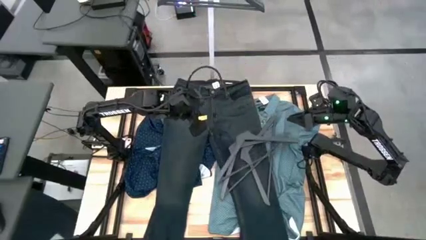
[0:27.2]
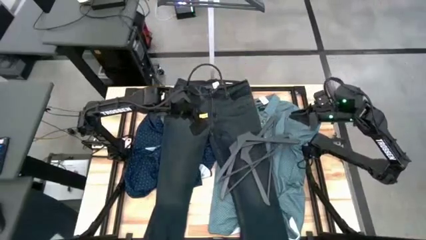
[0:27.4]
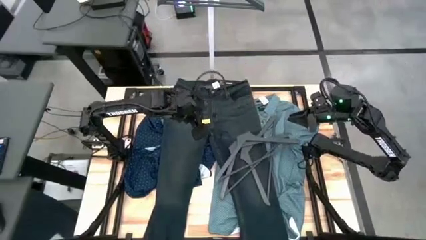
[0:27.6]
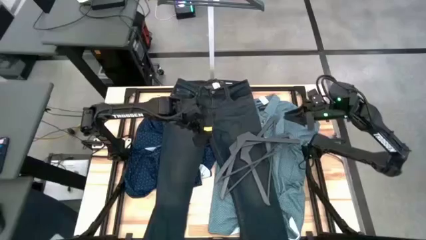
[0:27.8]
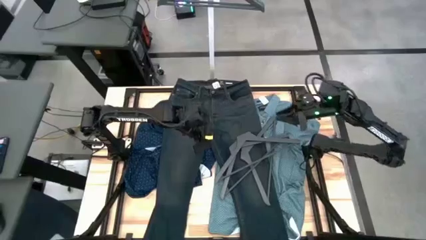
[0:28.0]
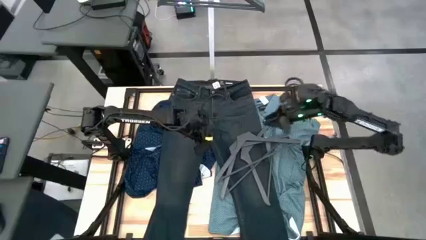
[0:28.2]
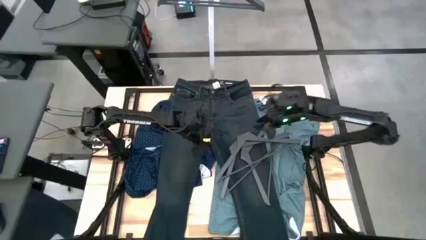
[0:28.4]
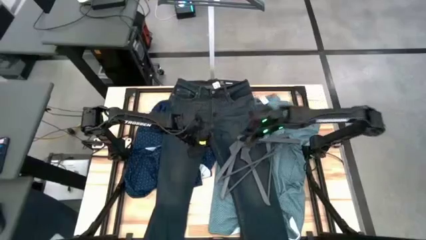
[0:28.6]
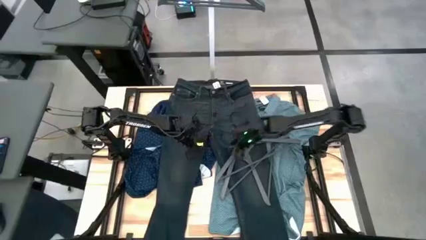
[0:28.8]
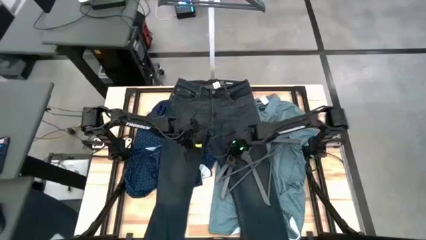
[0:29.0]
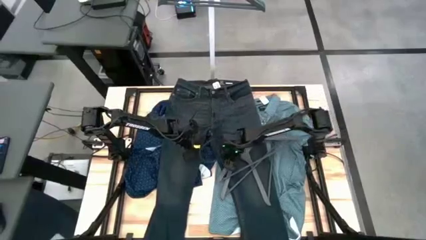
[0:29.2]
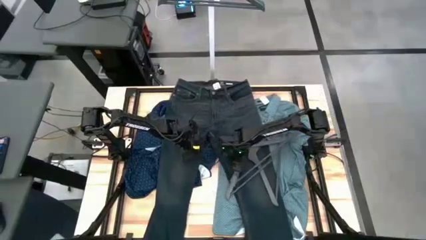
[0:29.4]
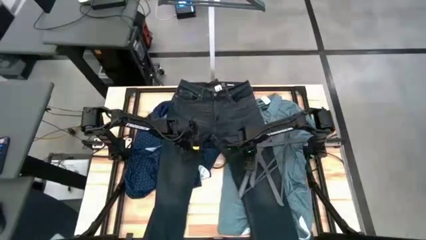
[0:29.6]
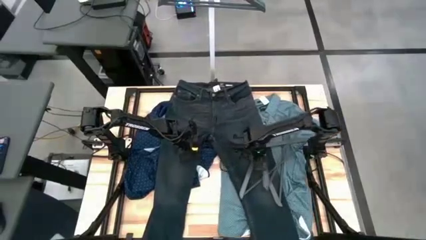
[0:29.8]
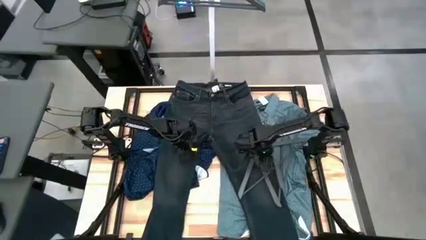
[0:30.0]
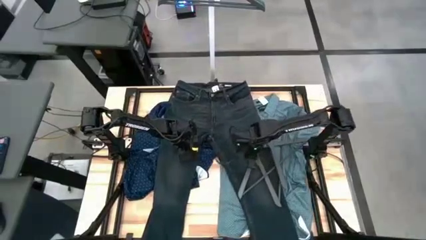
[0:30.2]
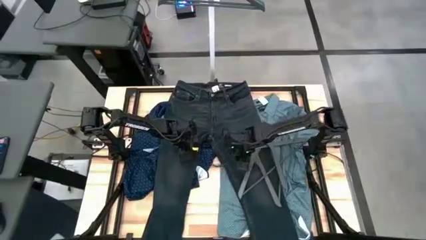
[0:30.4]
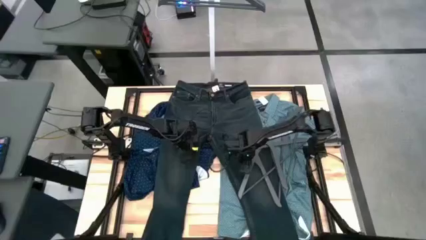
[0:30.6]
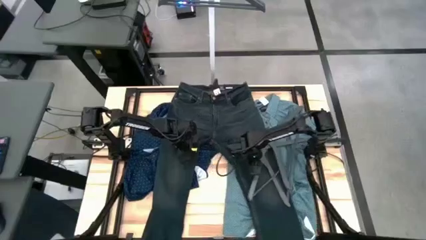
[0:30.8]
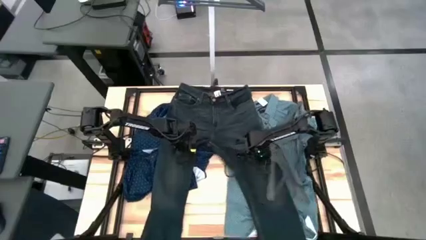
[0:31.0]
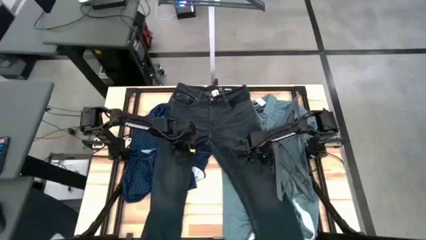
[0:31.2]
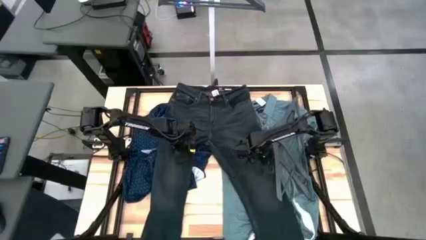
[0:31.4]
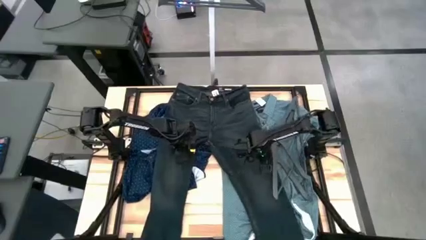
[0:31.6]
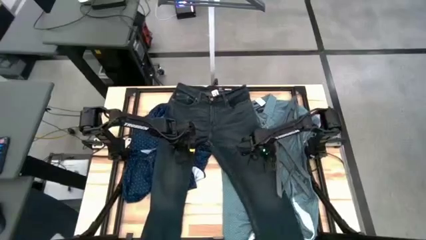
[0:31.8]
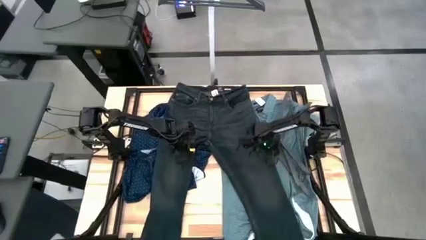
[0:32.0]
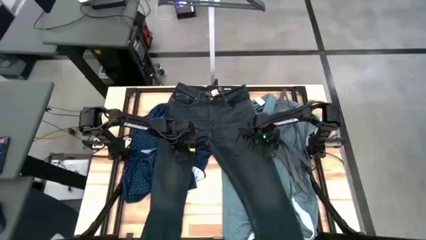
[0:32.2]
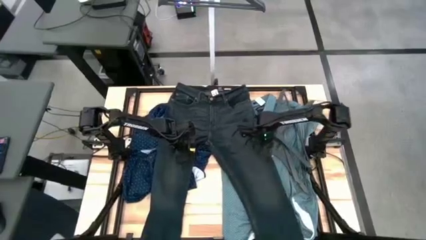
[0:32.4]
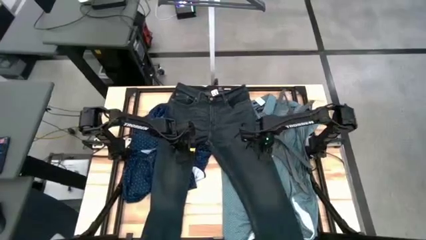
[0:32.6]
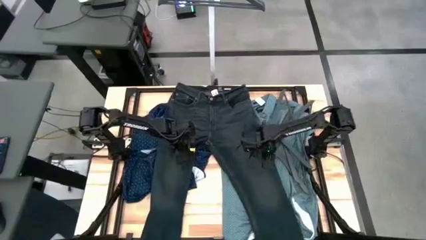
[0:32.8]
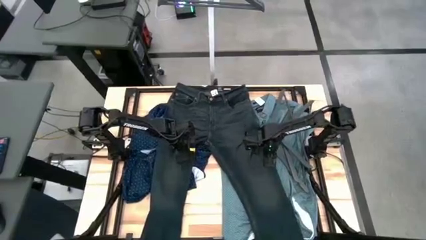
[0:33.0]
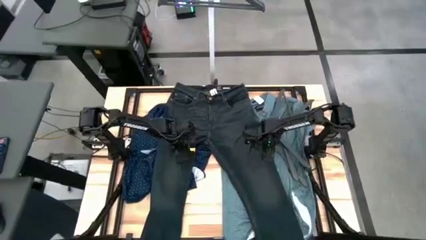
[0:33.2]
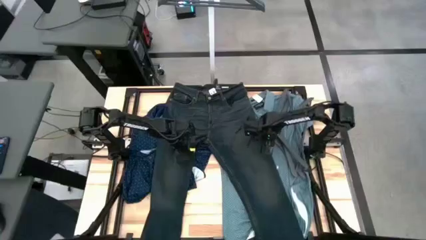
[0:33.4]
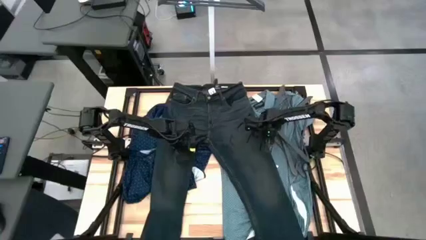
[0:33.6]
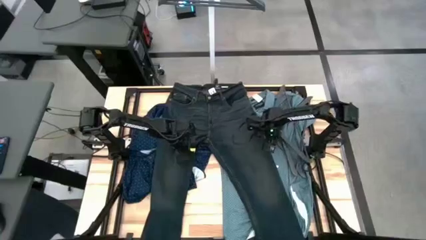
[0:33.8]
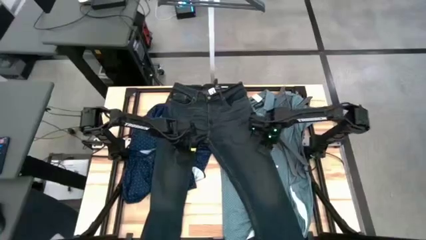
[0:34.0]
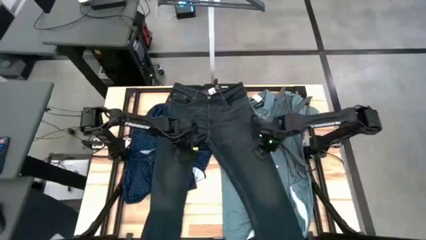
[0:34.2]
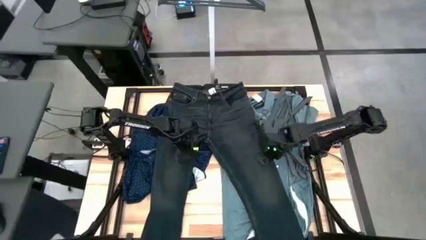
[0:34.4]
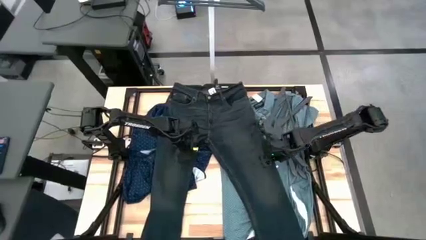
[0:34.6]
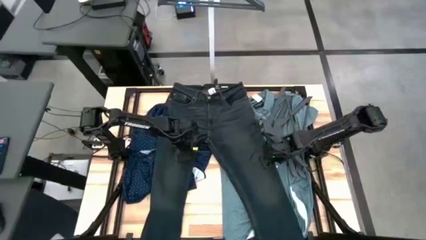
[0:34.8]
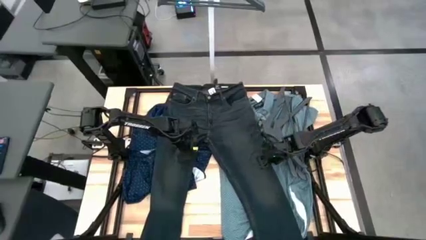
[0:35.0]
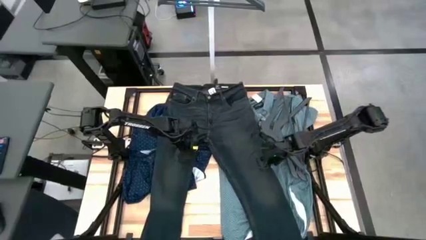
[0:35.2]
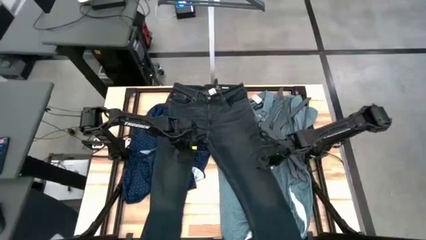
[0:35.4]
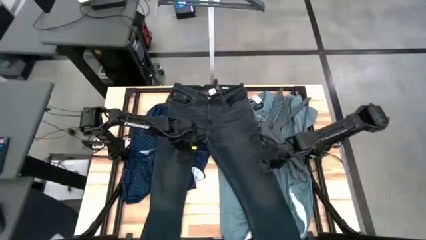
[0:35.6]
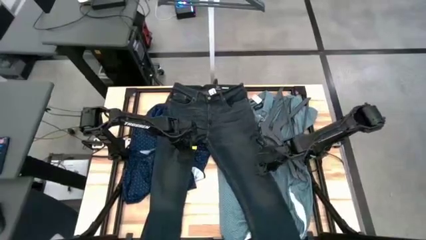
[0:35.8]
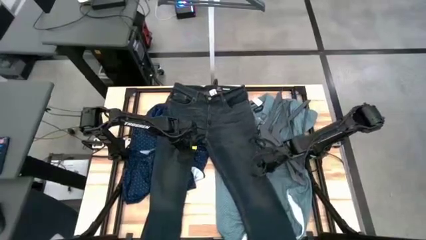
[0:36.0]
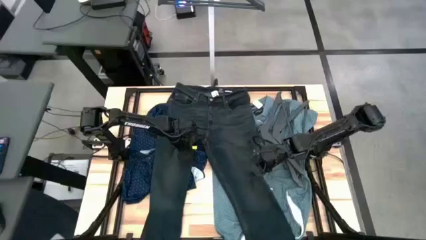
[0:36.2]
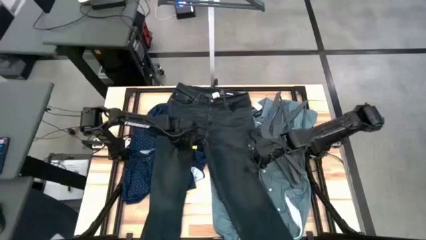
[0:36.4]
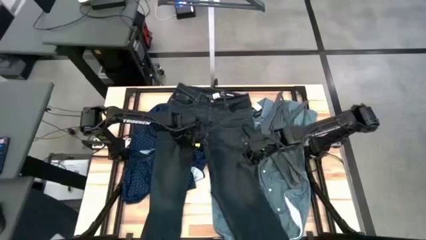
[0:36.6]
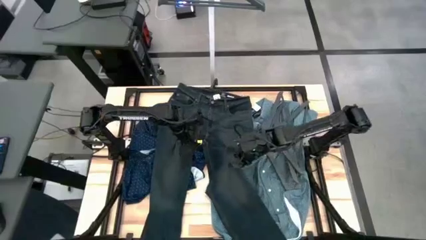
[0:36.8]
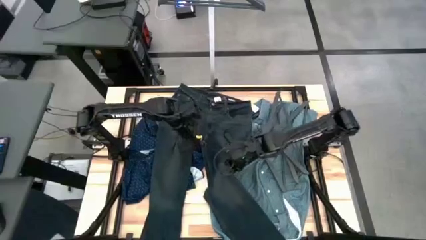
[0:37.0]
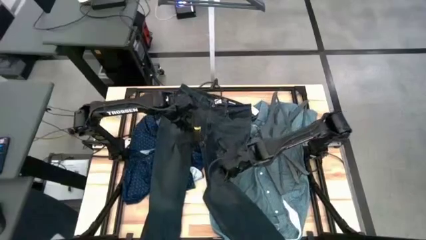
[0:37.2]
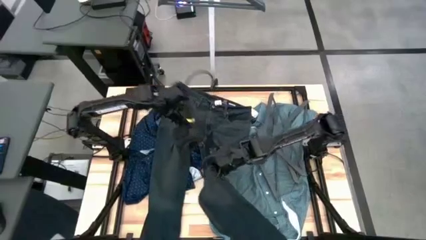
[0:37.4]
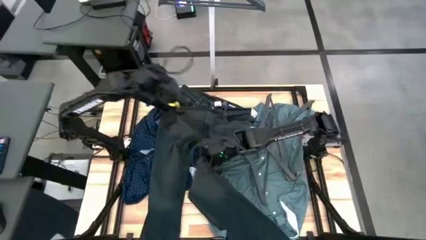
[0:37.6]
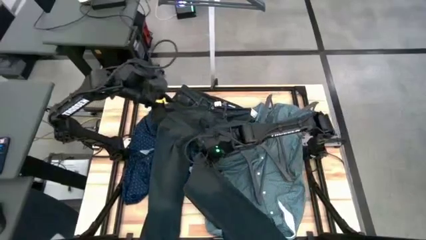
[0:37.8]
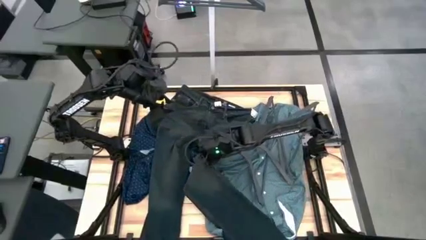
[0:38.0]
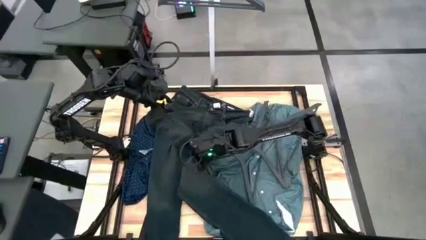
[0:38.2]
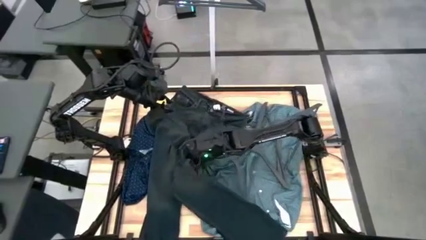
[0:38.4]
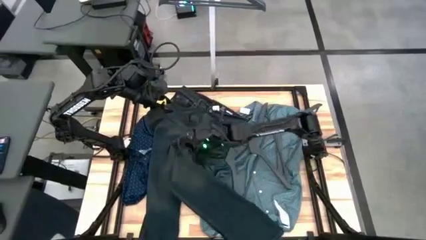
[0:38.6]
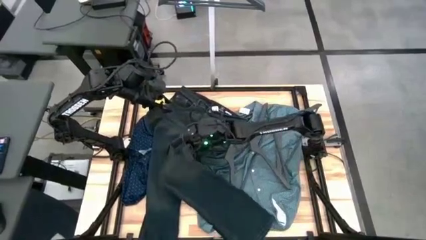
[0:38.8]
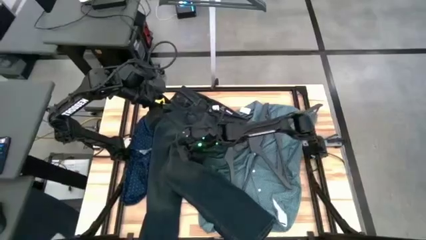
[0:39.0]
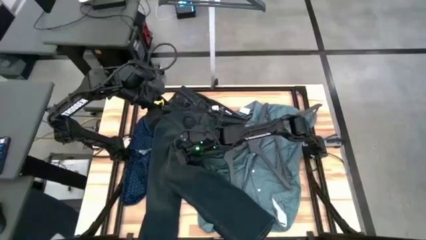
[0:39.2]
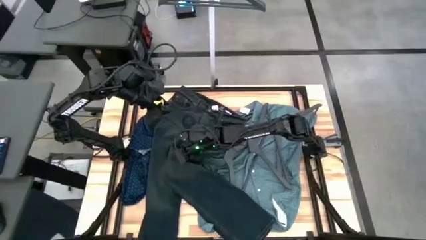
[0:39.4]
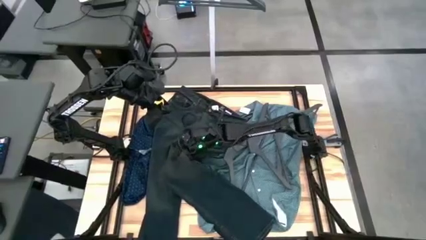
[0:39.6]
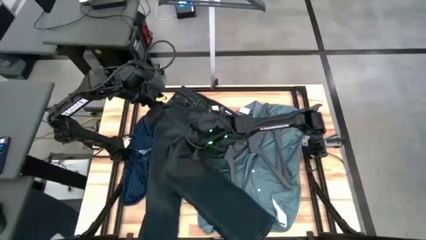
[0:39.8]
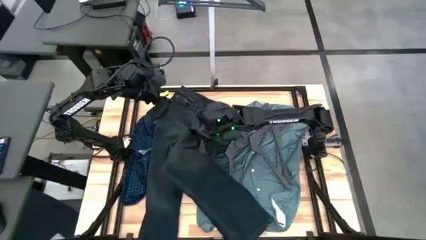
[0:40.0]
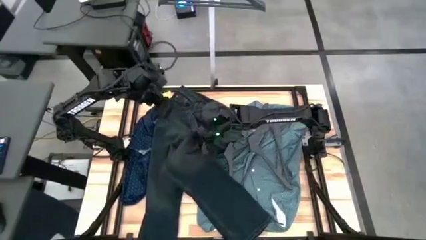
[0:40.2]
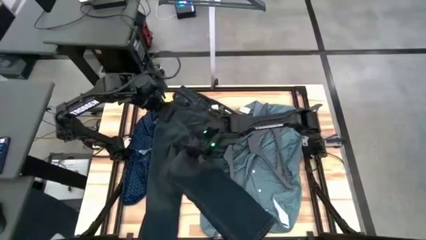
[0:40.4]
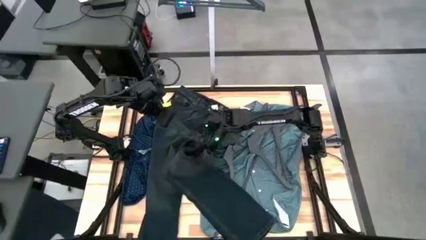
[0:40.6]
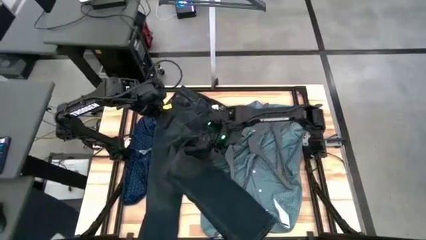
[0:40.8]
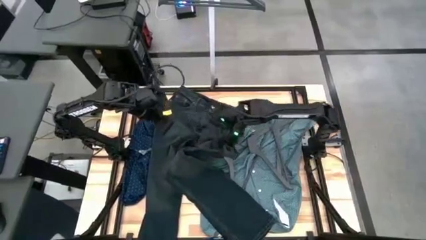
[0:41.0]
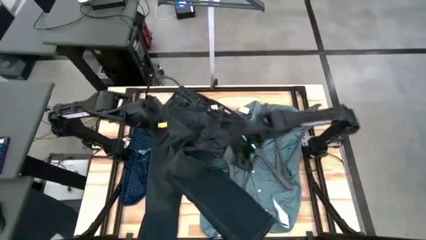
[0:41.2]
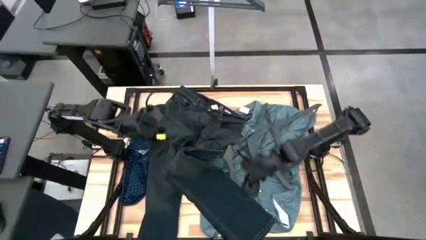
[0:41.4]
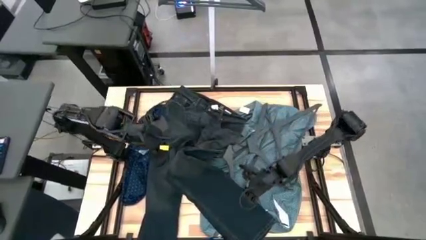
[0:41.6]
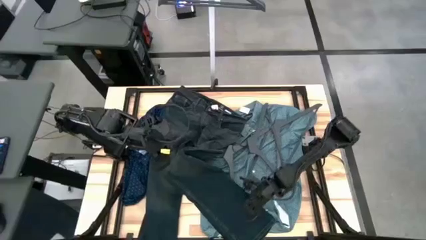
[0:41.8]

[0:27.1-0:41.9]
Task: Hang clothes
Hang the black pants on the rack
